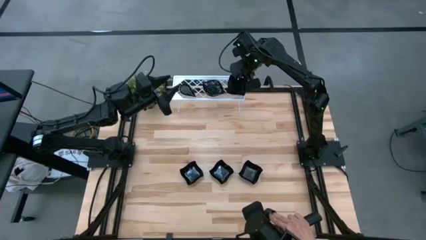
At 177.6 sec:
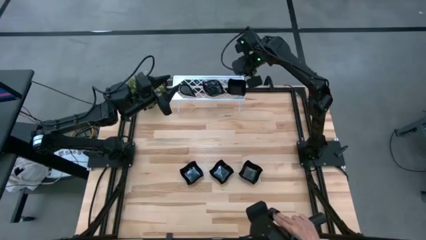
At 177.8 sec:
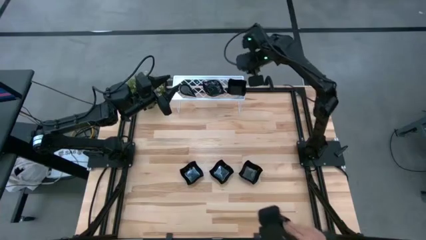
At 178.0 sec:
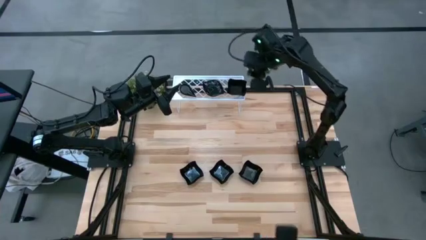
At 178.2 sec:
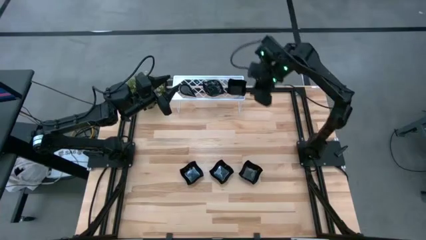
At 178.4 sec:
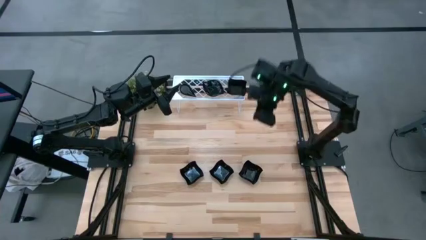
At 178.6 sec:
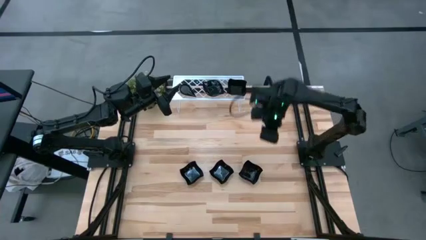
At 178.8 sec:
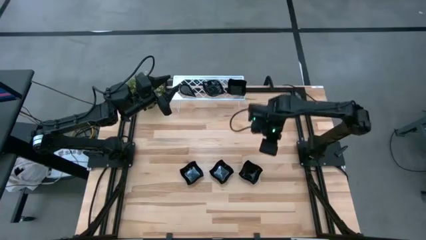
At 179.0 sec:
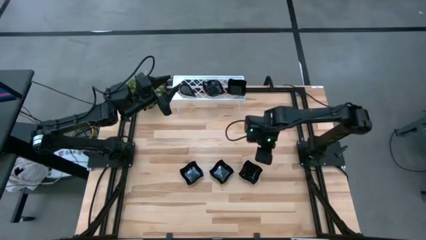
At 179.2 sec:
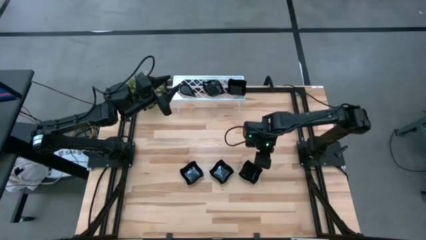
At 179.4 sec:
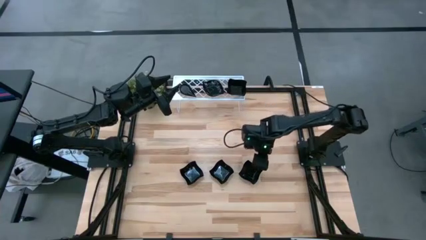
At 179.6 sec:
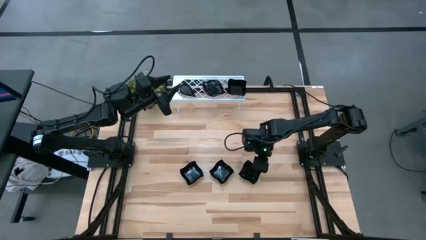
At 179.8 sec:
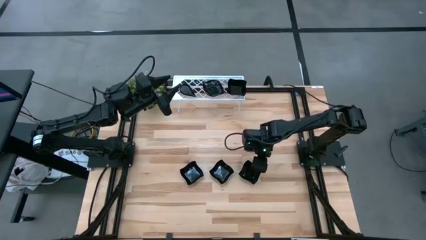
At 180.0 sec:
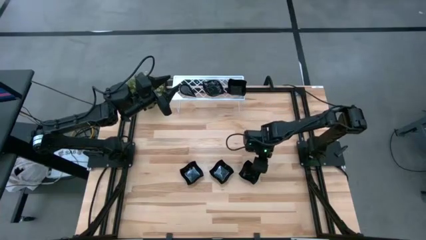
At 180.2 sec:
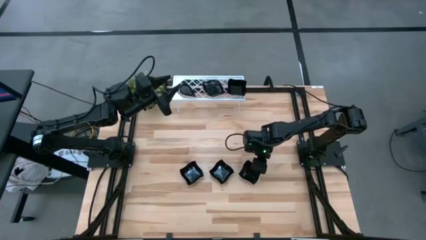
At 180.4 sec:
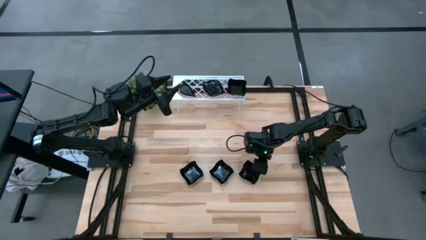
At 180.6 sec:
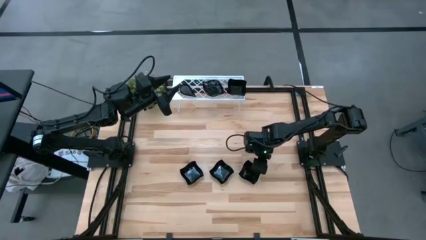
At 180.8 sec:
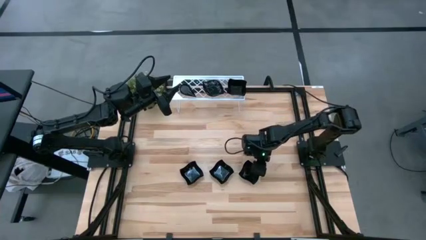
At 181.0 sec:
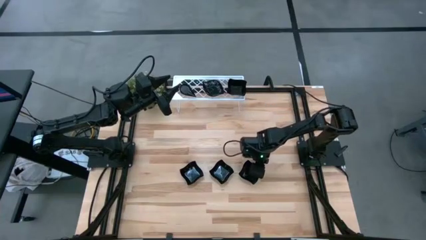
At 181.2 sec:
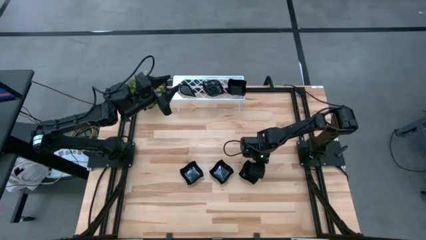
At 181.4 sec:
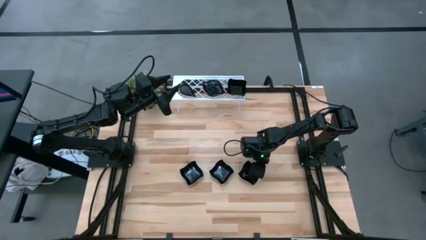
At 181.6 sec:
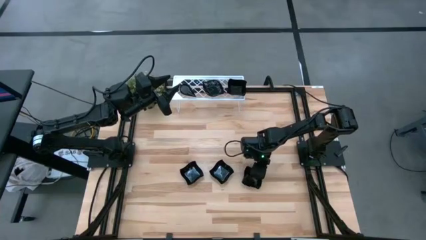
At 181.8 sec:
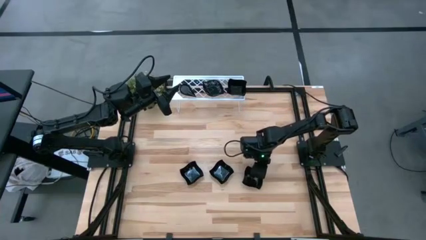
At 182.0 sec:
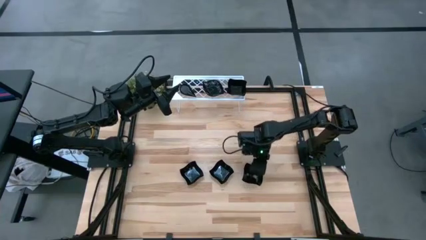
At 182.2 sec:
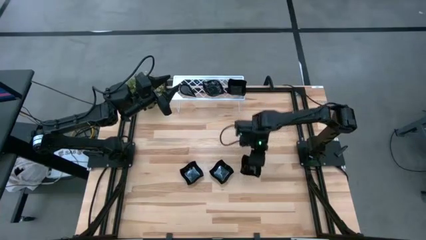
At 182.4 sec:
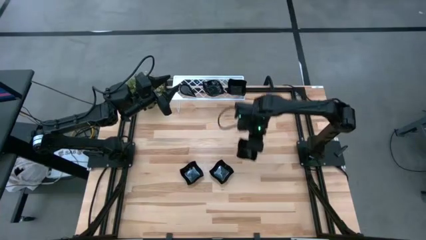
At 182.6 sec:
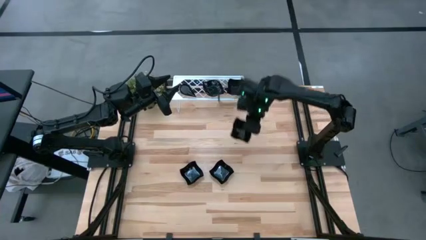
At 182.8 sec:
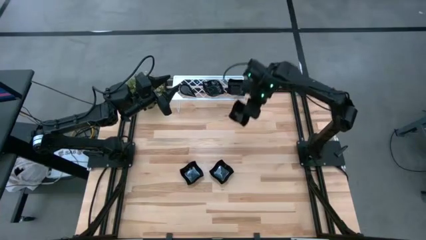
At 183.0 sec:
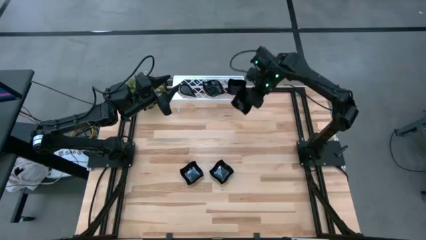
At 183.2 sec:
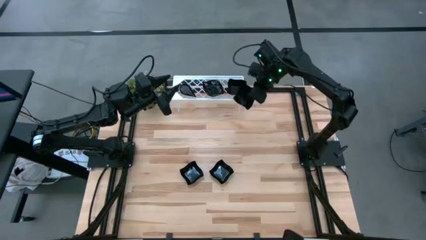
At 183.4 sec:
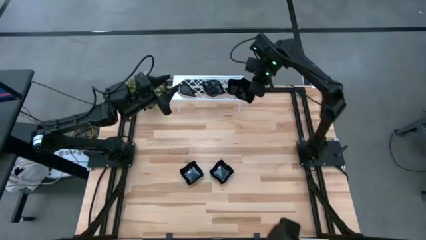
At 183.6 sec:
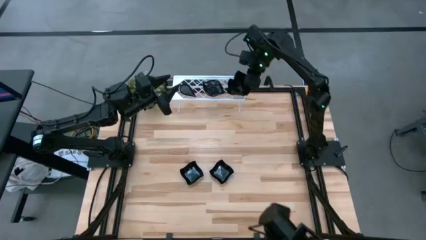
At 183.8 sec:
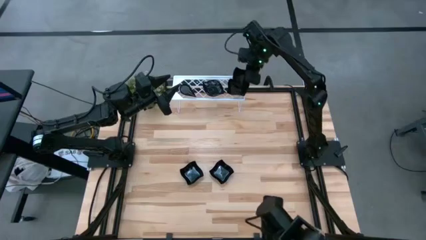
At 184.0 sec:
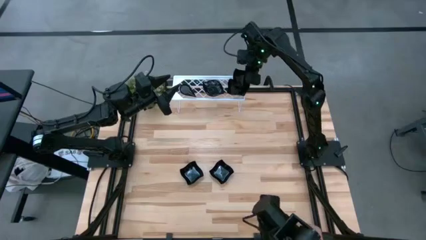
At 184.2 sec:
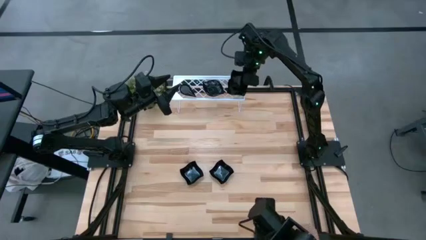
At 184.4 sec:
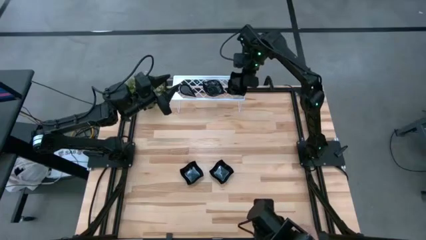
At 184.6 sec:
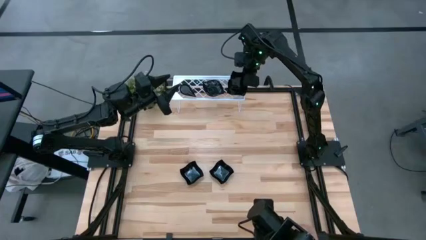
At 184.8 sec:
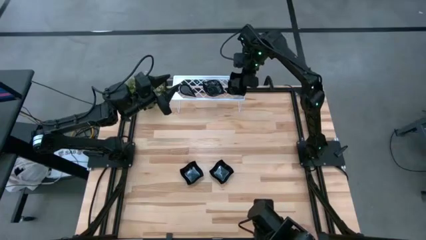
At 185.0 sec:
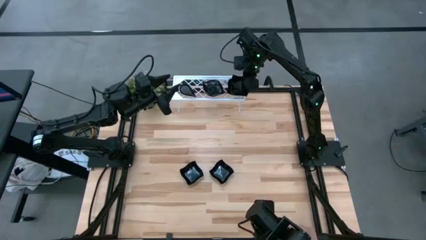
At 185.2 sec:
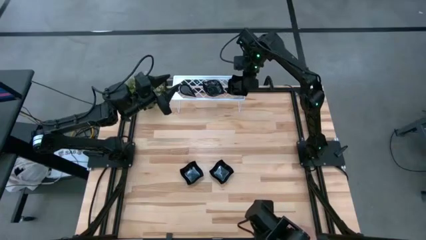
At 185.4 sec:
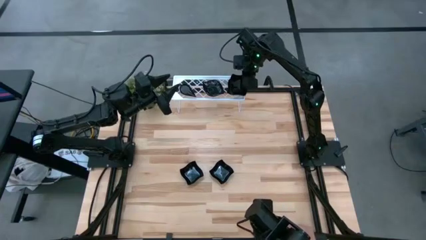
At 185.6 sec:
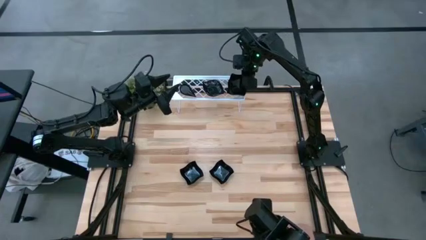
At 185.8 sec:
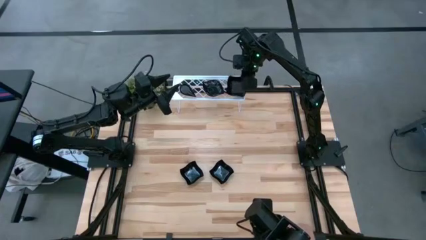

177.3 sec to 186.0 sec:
Task: Pick & Place Mini shaped plates
Stack the black distorted square plate on top of the black distorted square plate on the shelf

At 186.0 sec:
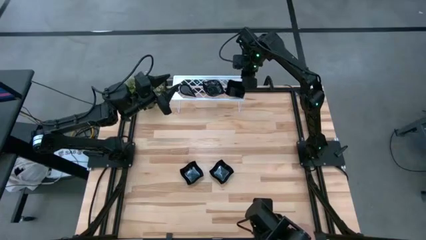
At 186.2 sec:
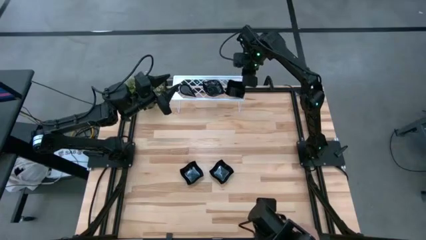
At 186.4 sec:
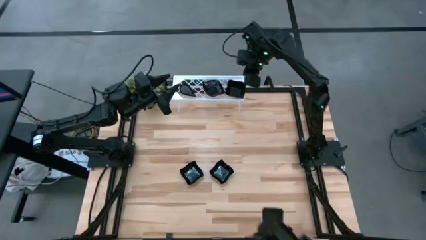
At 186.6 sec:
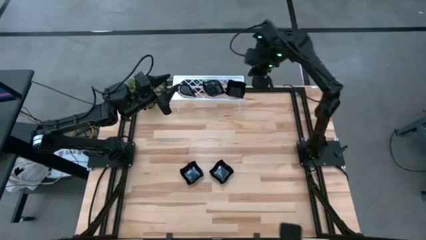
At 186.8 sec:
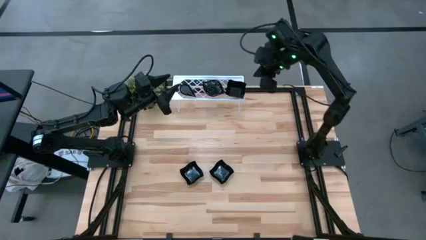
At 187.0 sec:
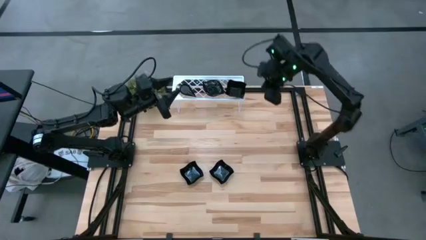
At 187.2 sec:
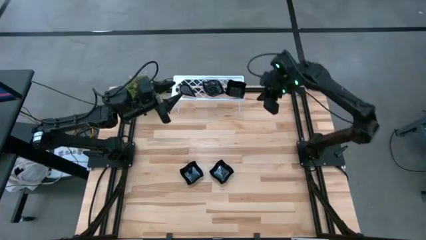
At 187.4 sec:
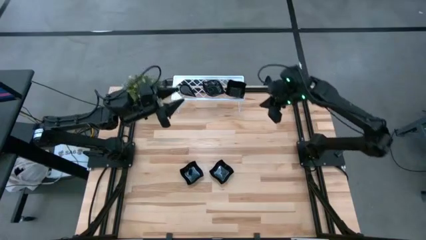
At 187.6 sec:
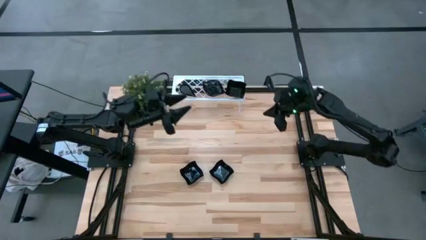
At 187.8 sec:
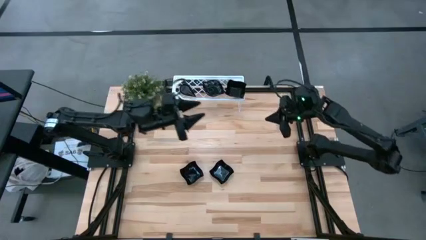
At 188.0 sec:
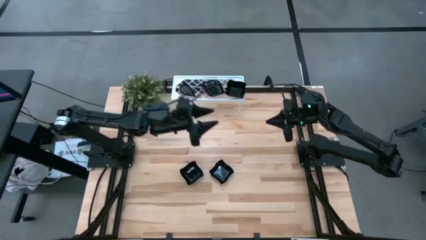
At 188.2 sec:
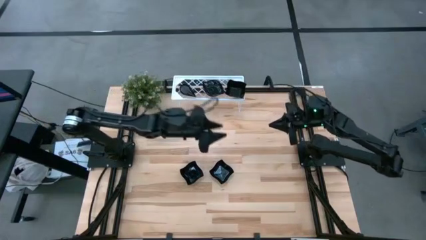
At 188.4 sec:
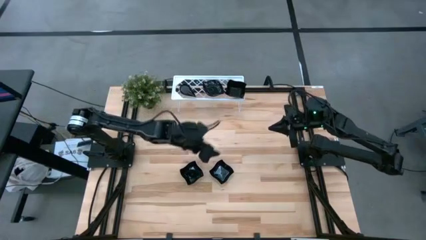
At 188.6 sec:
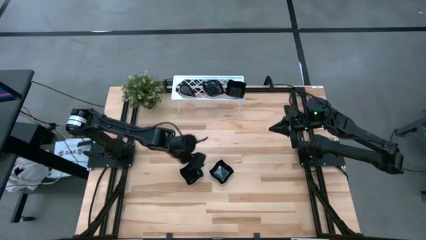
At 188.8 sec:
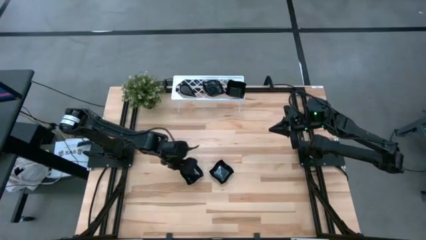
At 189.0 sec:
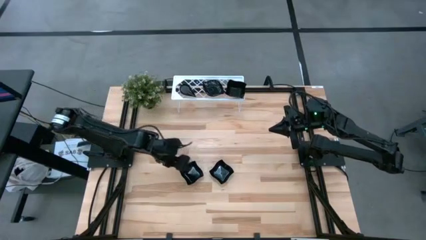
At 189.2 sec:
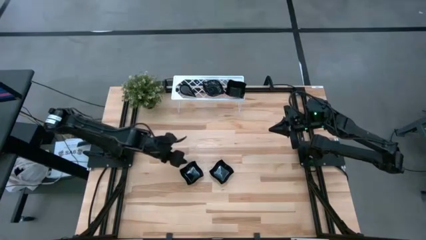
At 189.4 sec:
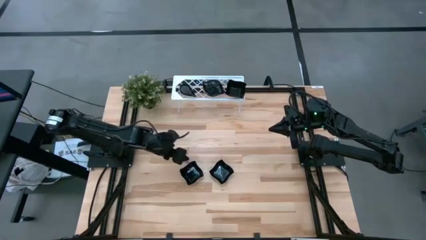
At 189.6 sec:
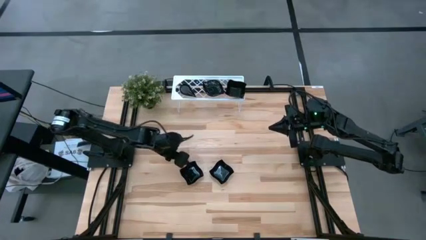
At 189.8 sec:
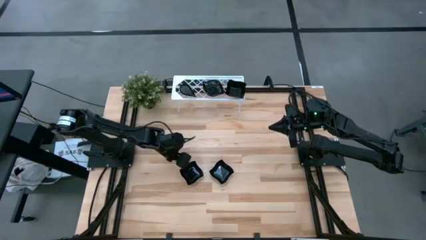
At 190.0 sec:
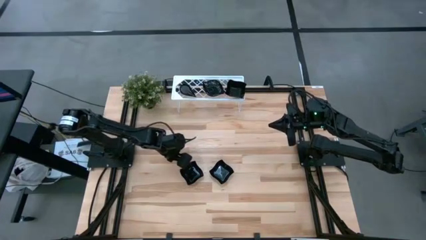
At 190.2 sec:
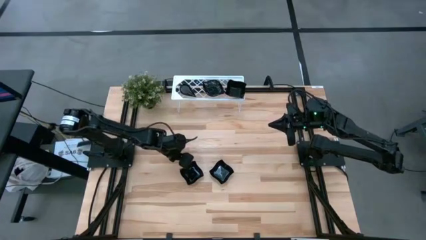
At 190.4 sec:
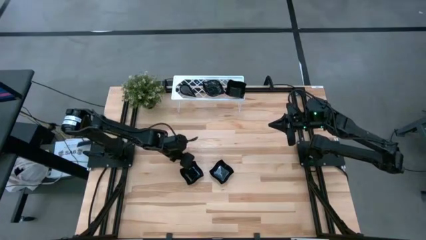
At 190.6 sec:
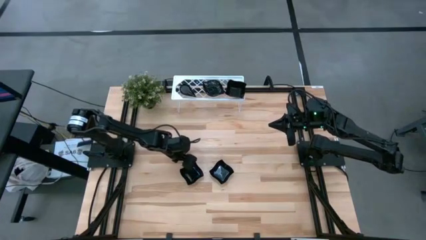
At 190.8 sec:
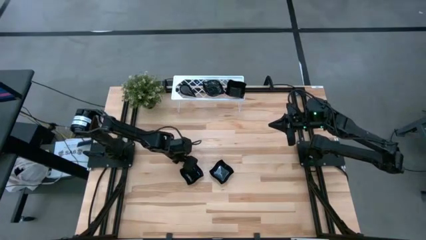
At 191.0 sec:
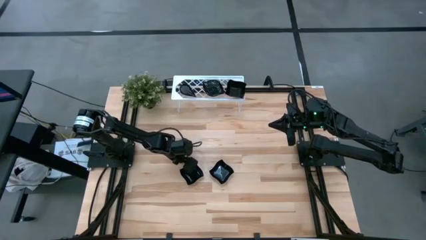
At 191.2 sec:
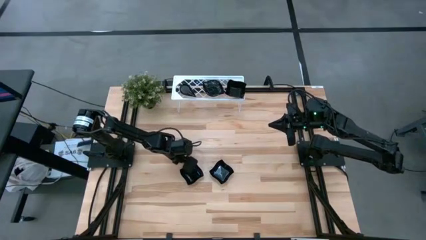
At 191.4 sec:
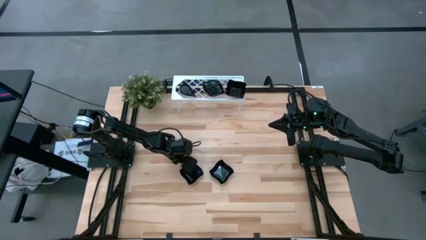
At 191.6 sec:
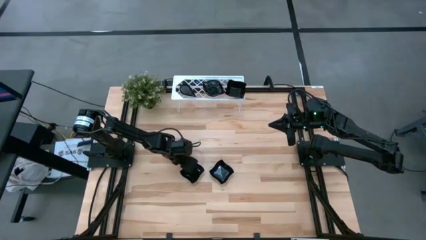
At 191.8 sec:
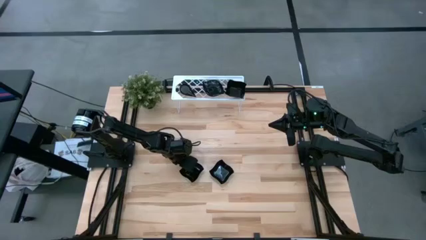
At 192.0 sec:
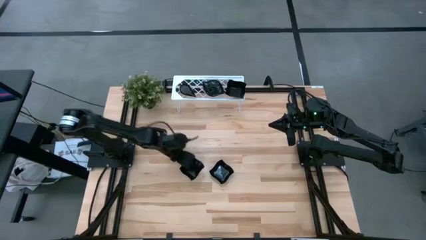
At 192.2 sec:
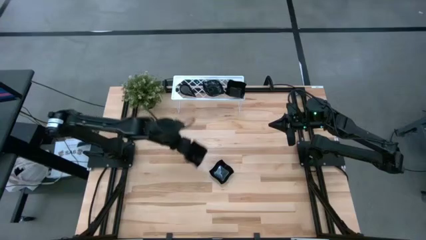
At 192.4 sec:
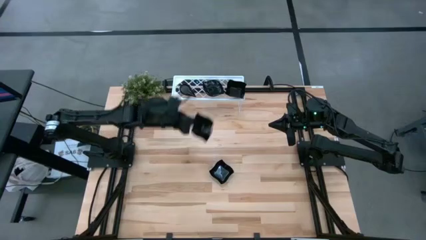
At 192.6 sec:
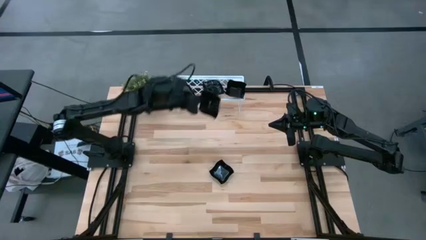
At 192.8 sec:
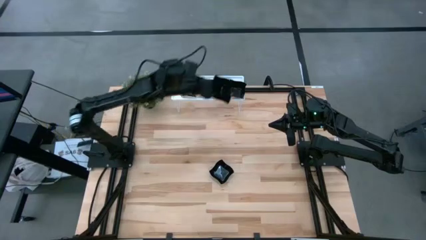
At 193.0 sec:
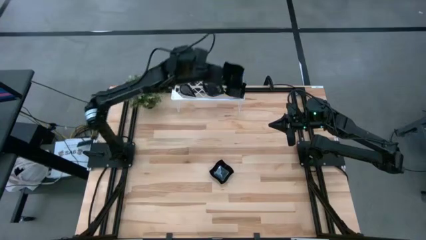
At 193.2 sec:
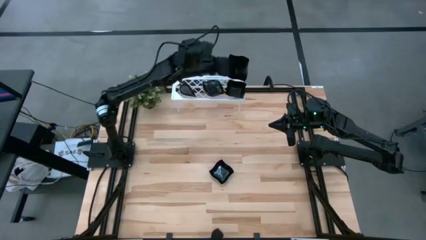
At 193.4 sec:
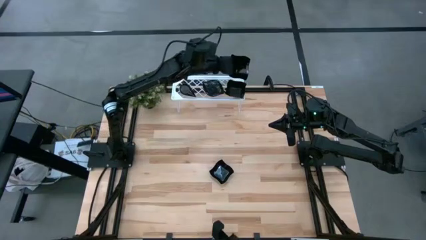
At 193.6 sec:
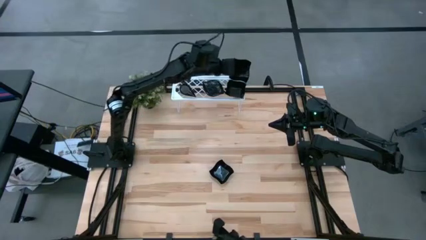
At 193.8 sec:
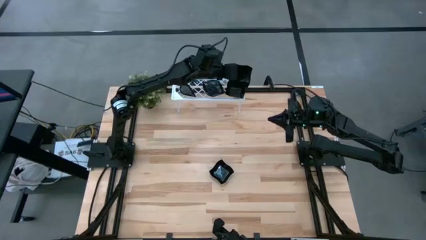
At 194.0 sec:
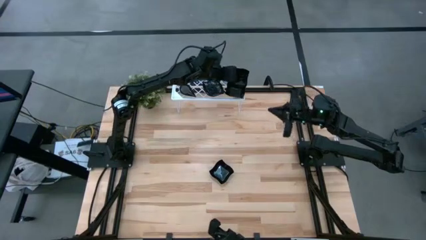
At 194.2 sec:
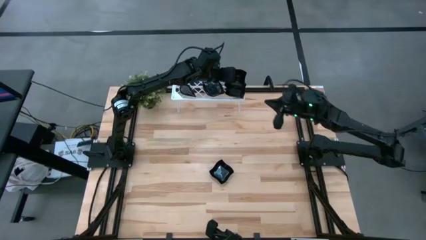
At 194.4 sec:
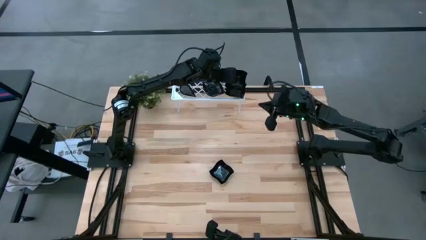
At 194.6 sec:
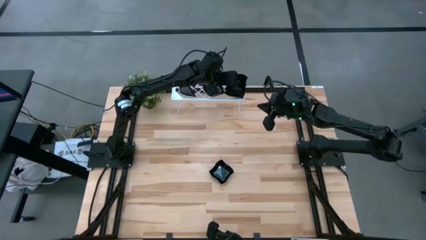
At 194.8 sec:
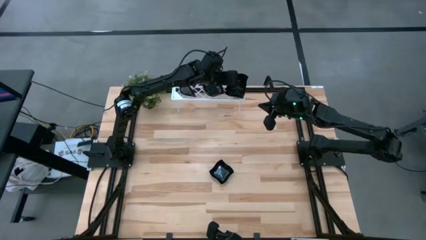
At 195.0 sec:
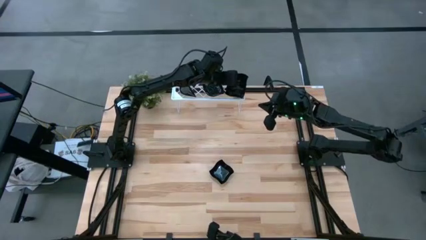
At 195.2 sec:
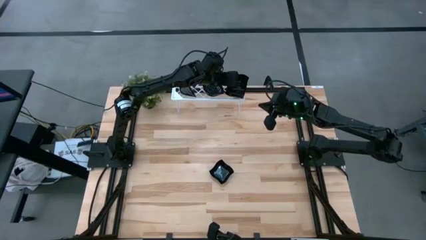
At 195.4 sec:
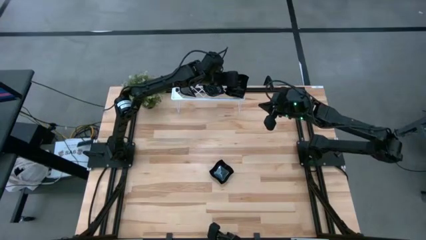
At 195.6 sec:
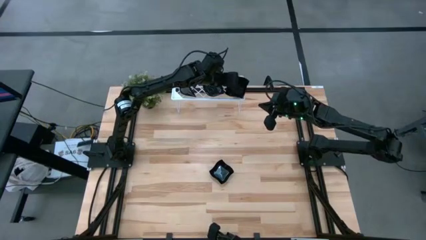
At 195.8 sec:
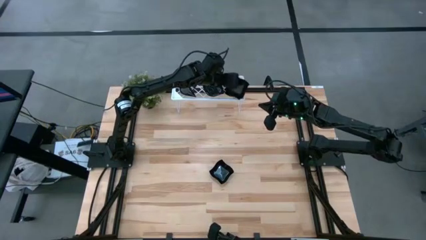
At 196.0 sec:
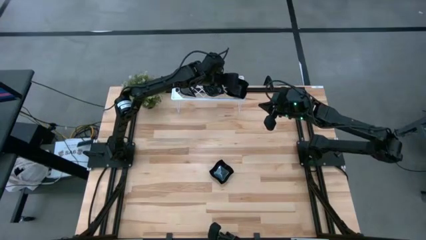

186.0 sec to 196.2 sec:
Stack the black distorted square plate on top of the black distorted square plate on the shelf
